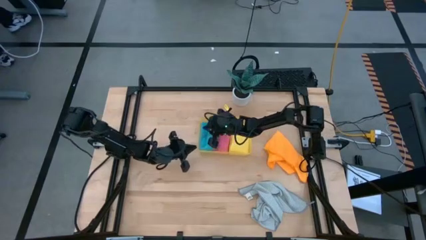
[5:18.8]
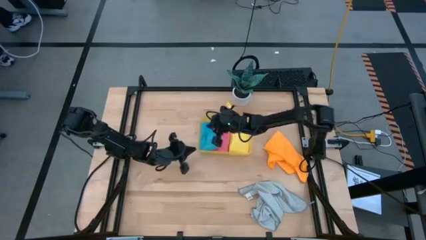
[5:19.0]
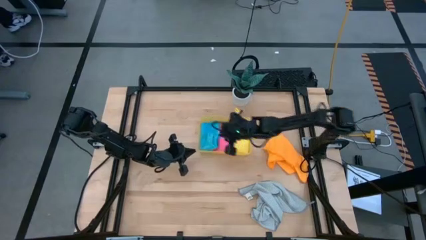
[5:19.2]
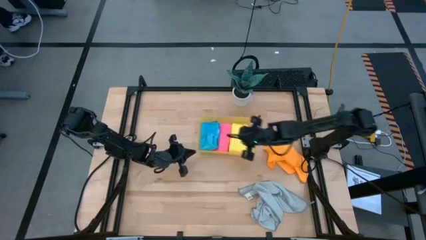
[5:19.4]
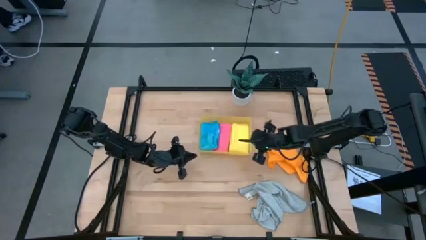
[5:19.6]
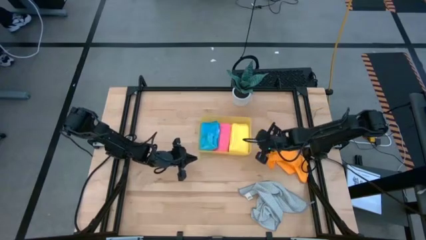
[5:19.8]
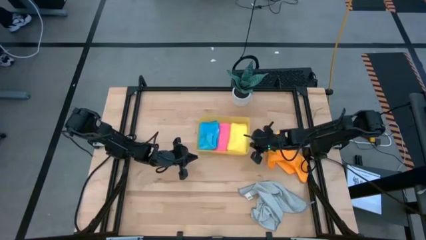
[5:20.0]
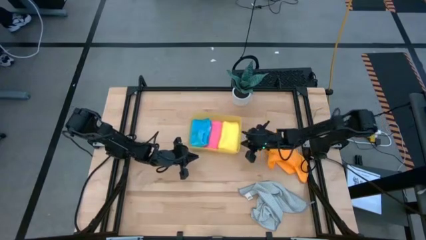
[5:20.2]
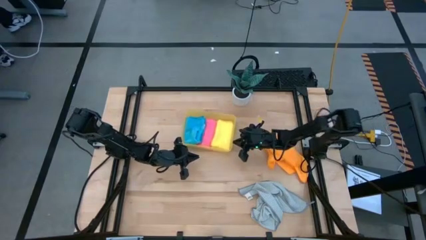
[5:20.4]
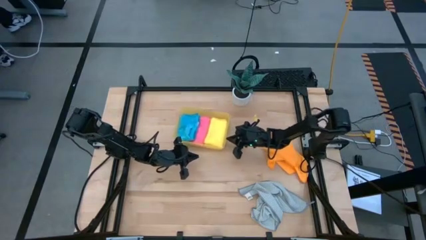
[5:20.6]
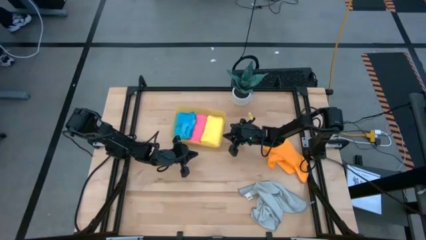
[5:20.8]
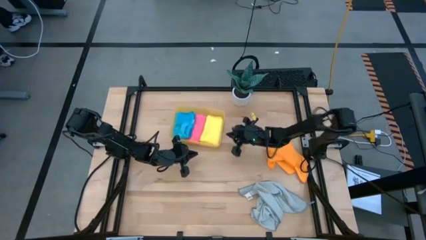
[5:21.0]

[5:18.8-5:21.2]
Task: Fold microfiber towels
Adjust the yellow bin

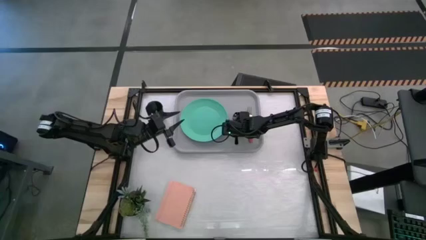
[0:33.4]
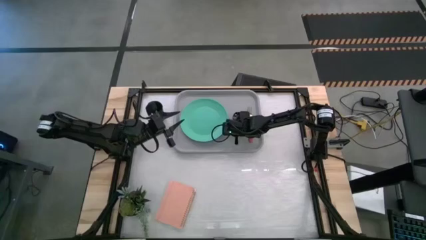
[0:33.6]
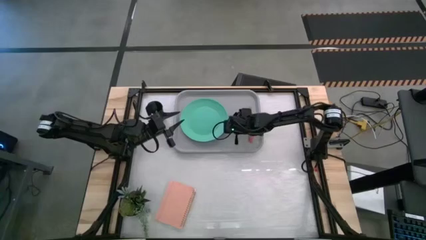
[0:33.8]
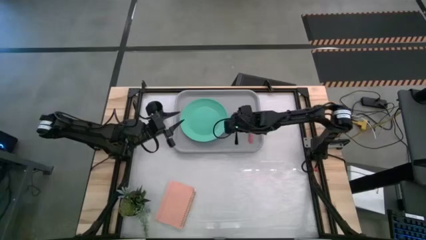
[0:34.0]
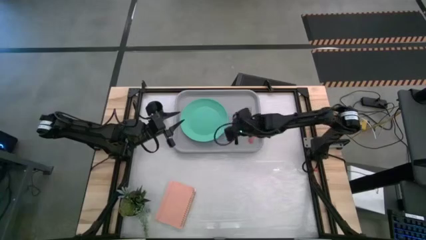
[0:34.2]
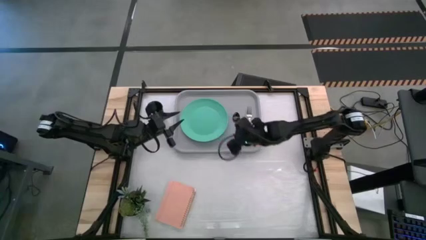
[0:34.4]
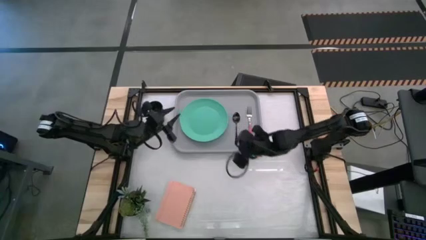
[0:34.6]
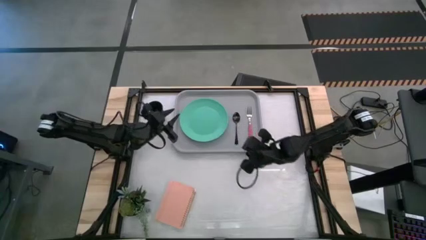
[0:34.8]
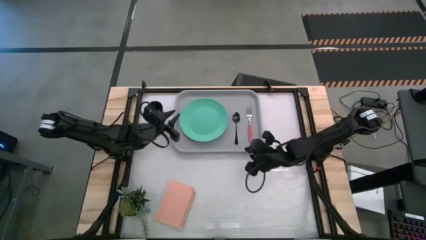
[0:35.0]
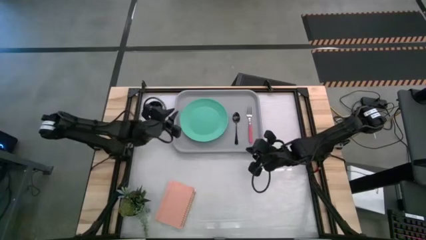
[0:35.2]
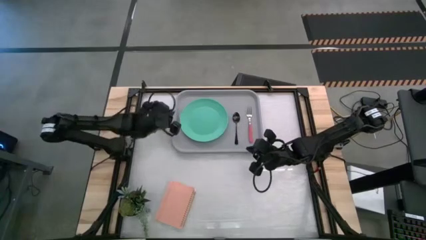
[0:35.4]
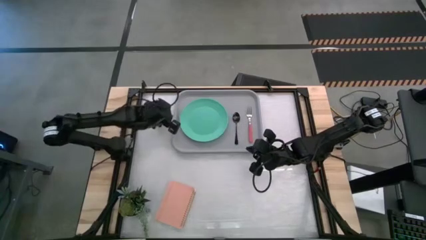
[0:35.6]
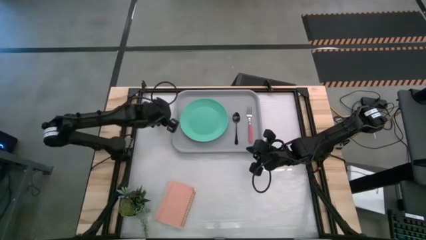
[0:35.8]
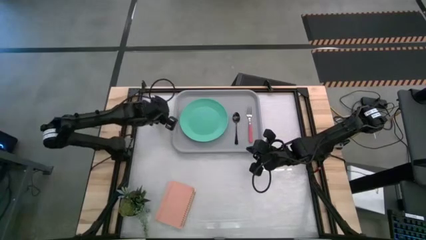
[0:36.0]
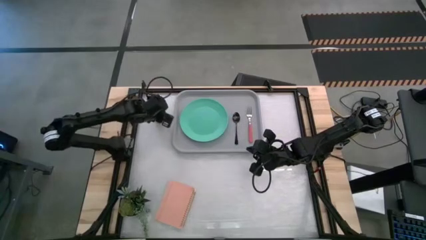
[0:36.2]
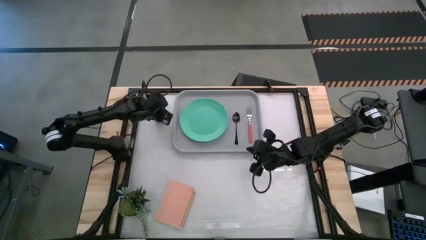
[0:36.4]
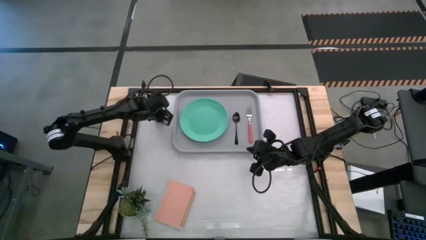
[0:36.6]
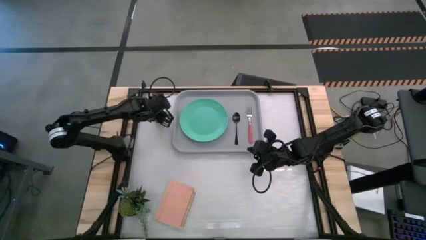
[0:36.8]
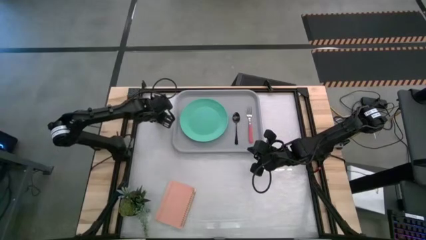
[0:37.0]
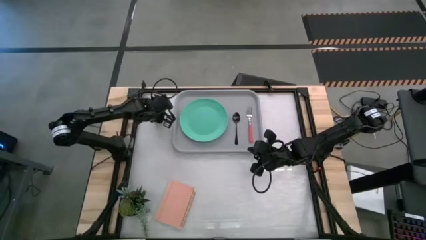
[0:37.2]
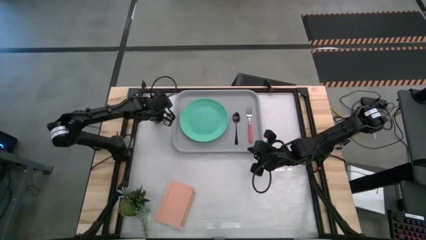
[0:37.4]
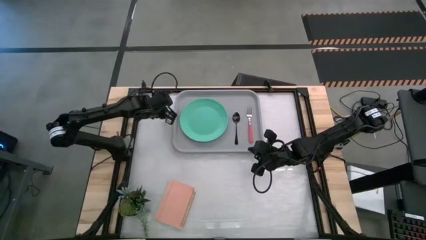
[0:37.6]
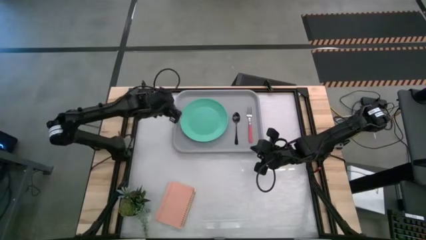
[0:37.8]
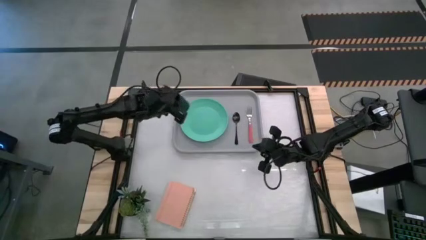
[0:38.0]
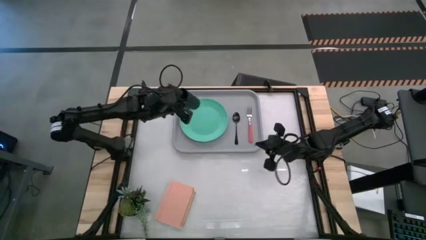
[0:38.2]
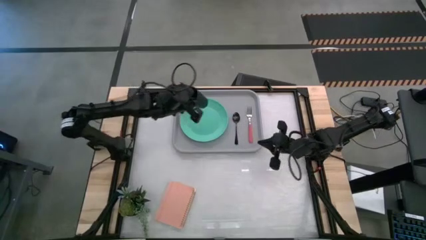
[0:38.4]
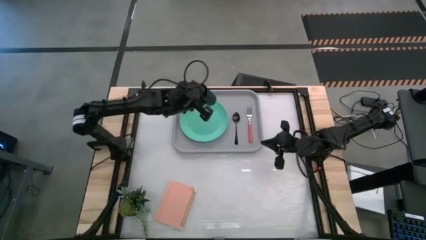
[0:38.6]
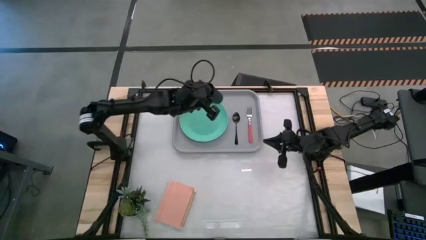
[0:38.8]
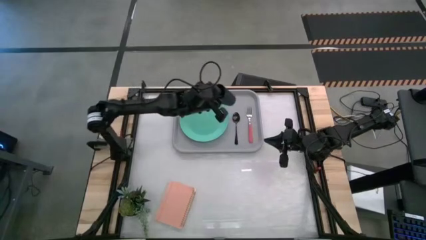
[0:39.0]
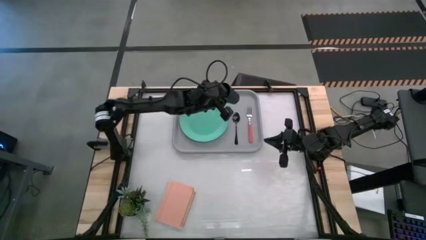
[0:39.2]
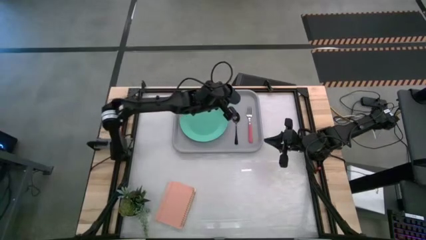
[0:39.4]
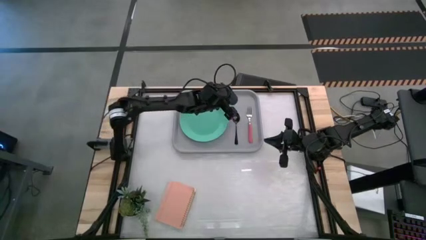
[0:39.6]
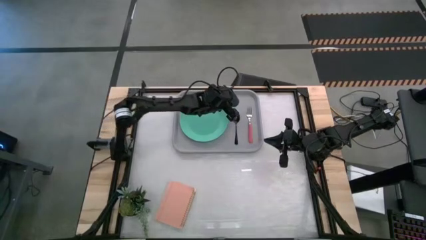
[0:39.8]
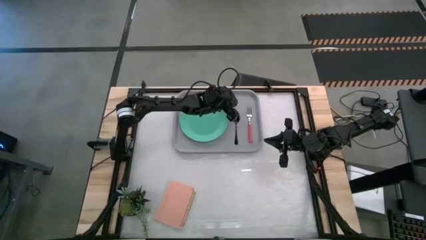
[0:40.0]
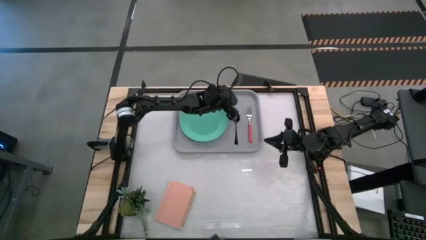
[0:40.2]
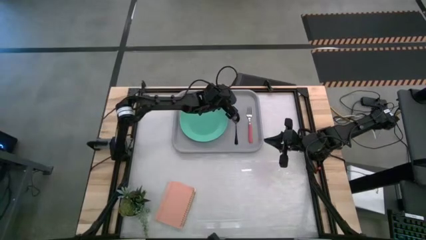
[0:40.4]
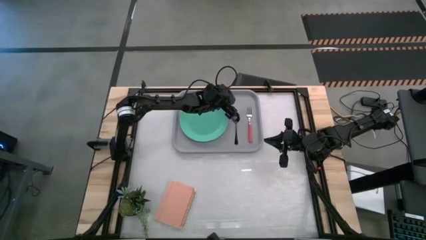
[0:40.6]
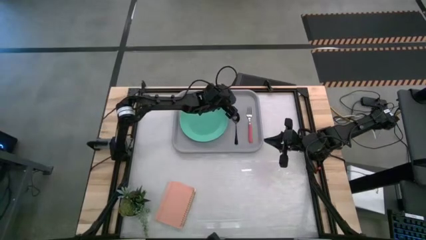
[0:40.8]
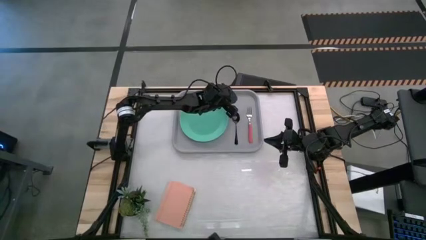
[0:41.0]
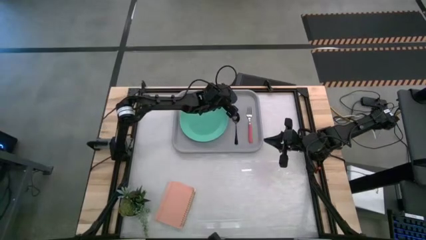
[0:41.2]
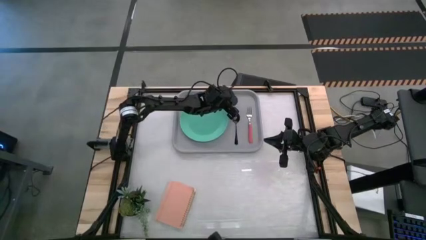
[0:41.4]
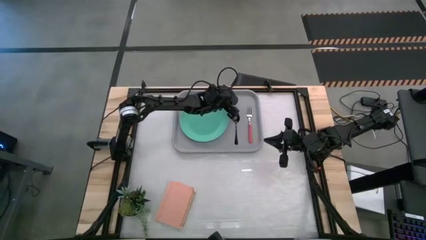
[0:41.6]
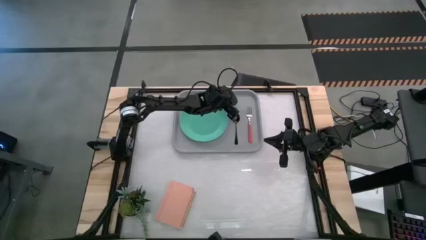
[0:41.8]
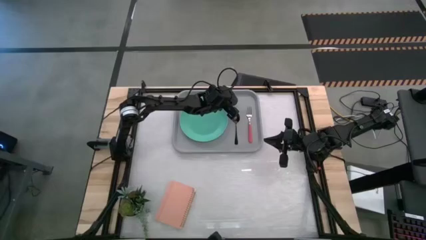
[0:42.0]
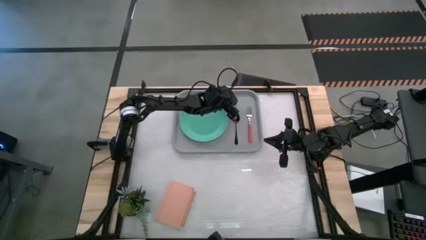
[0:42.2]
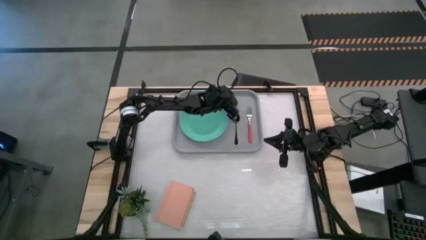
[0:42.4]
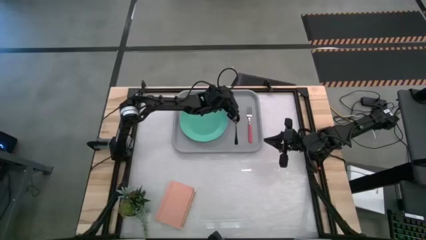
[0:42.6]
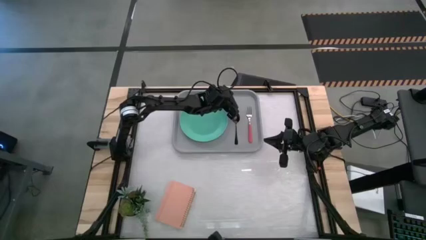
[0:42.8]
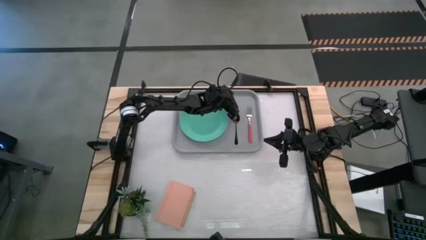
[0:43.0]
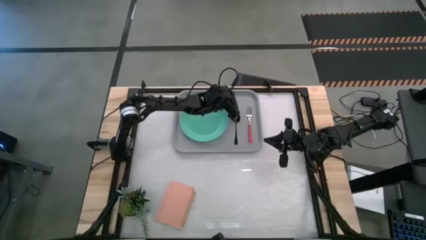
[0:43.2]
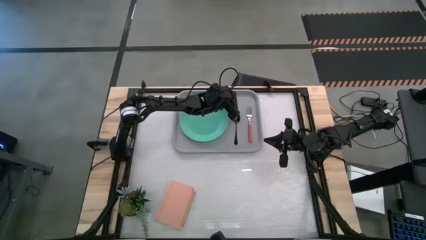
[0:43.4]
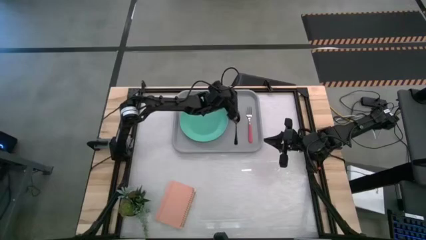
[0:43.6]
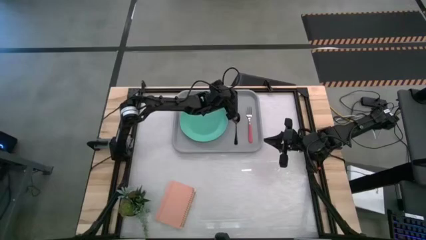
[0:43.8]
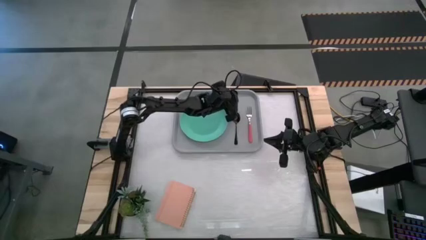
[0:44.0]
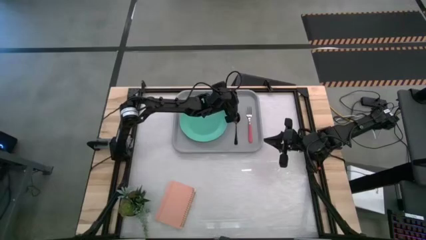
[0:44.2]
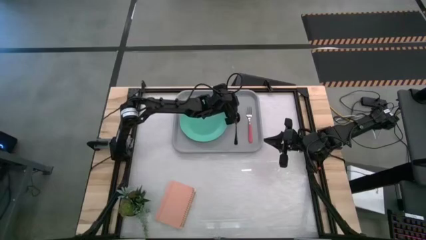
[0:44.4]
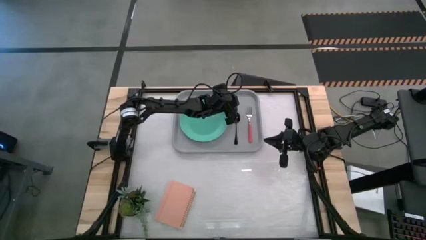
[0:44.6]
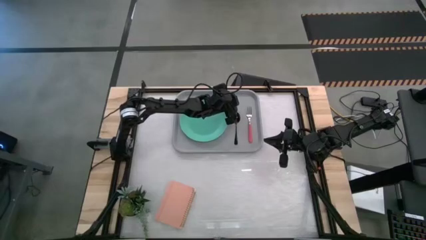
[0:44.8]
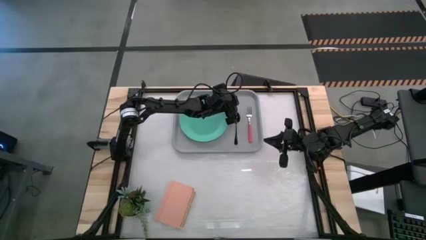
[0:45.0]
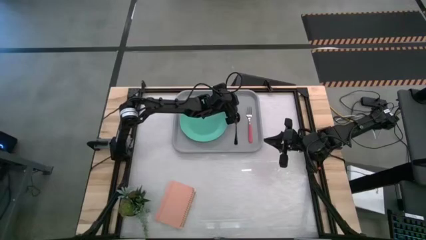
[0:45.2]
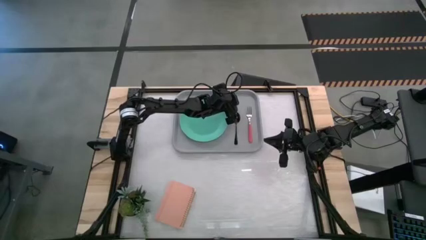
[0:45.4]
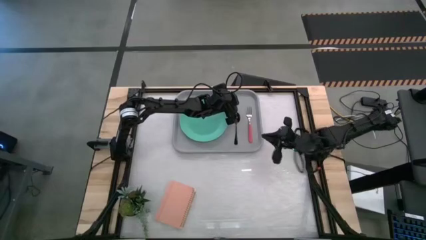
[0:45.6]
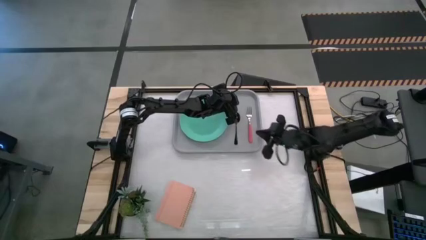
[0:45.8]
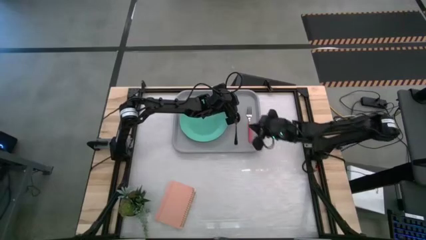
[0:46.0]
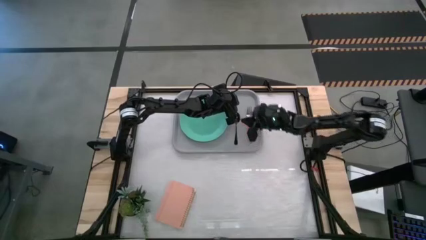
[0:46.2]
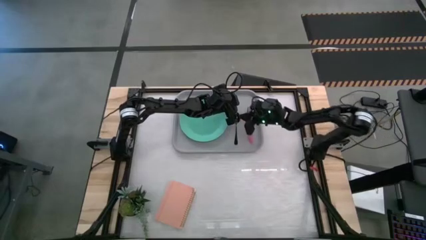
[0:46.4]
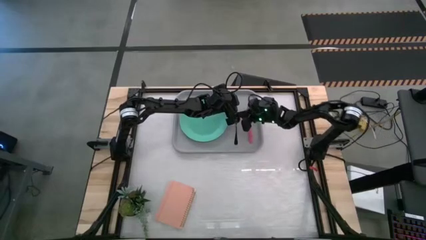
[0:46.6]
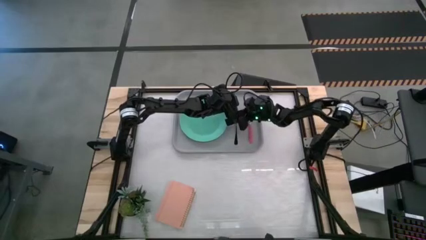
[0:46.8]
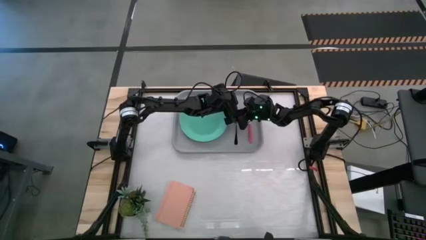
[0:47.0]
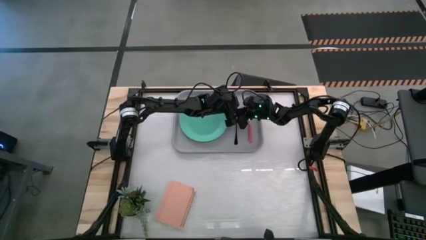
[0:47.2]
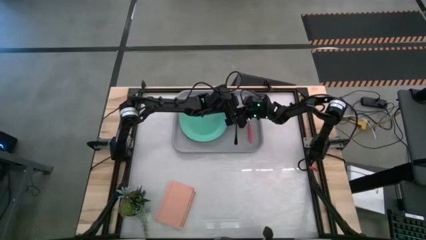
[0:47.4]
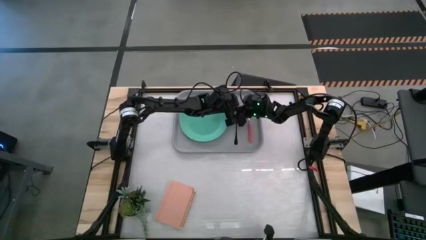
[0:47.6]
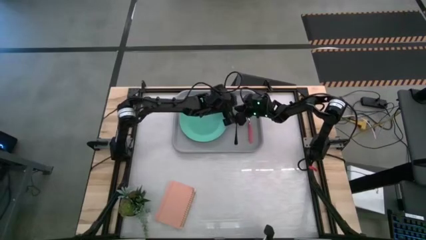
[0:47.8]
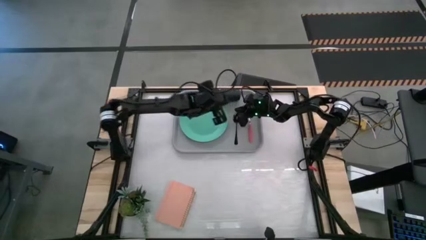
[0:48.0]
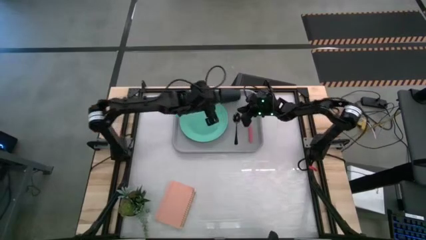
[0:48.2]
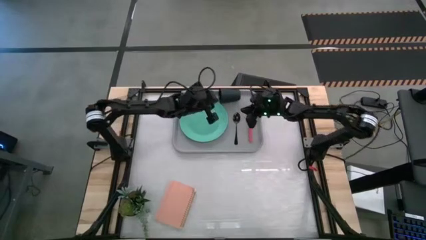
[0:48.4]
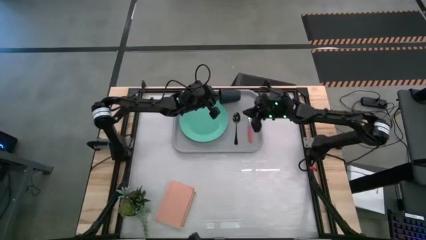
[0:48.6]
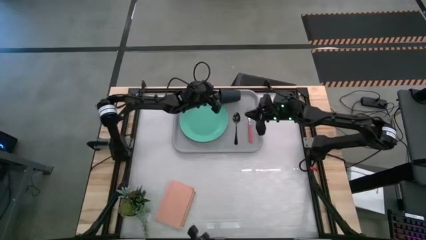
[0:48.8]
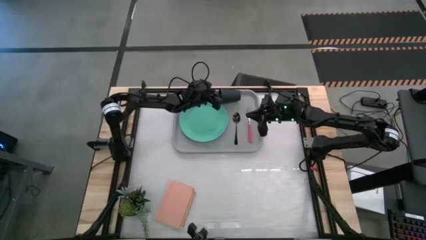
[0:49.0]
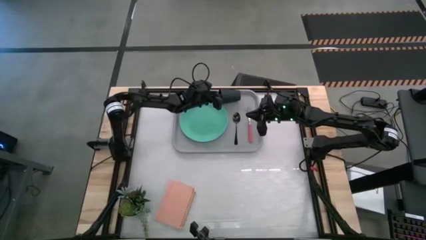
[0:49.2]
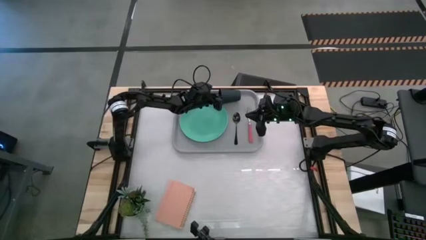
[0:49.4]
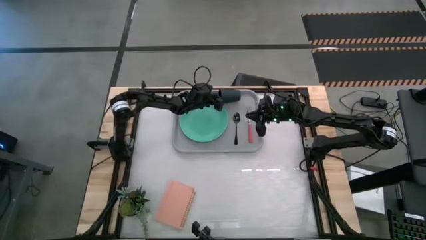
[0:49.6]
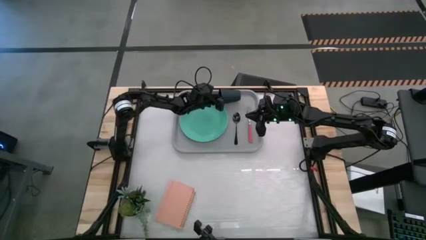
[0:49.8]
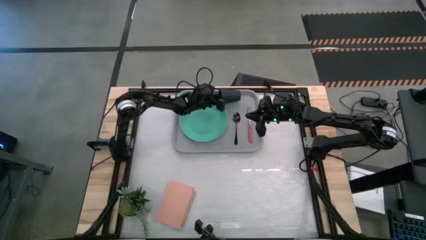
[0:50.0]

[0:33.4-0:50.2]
Task: Pick and place plate/cup/fork/spoon on tray
Put the black cup to the right of the green plate on the gray food tray
